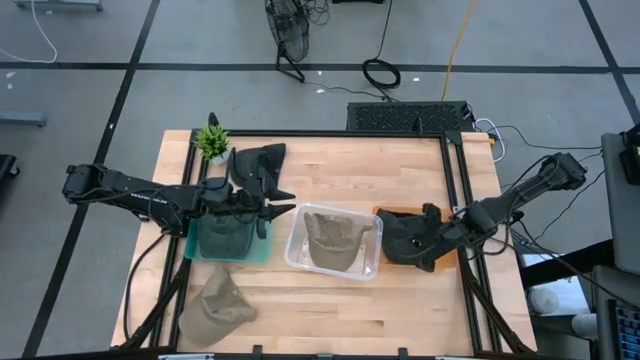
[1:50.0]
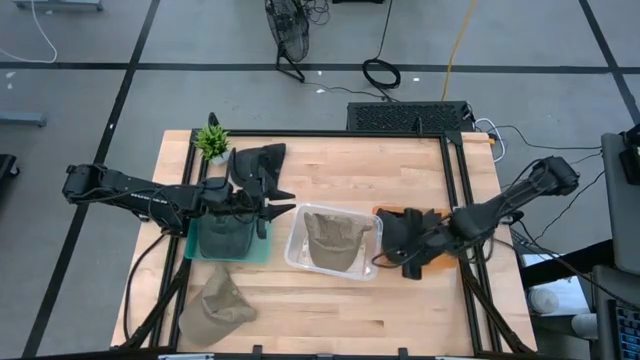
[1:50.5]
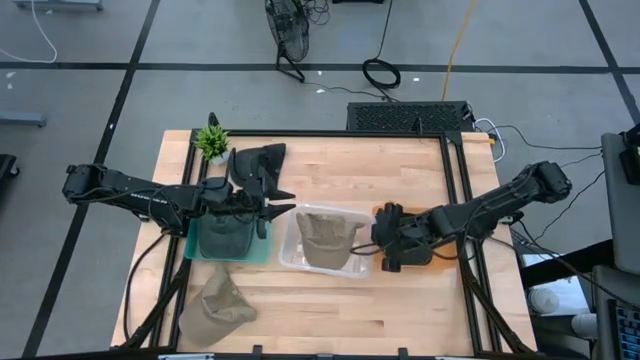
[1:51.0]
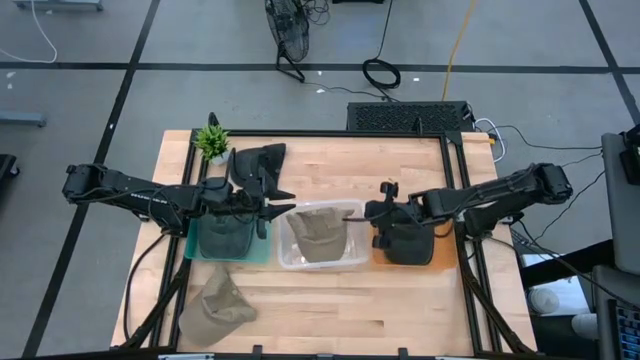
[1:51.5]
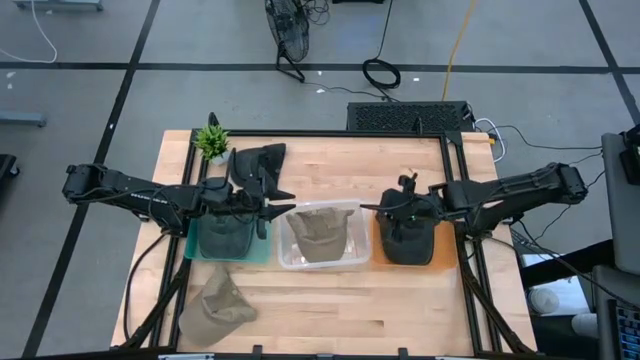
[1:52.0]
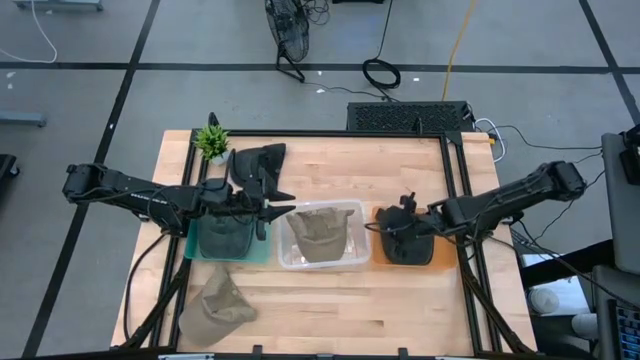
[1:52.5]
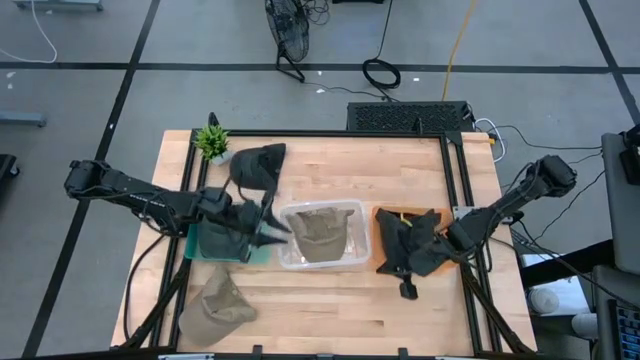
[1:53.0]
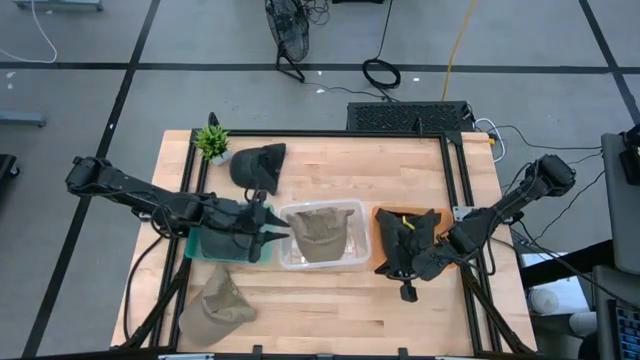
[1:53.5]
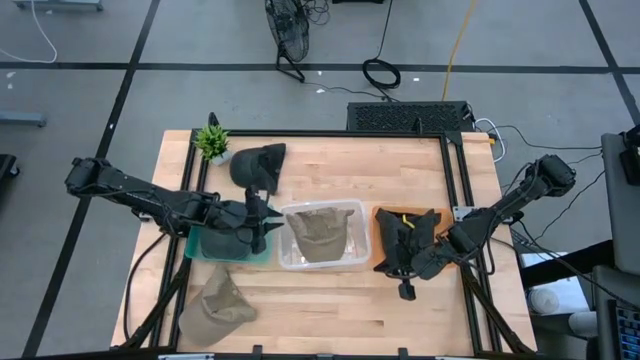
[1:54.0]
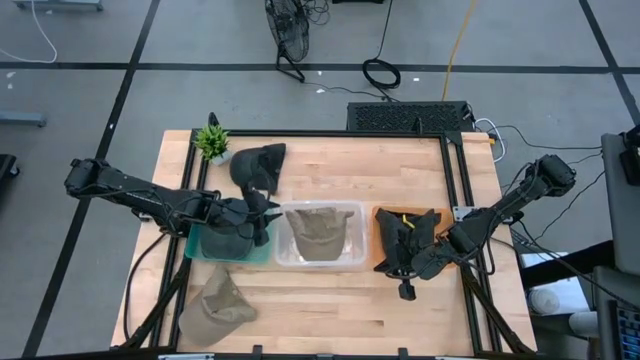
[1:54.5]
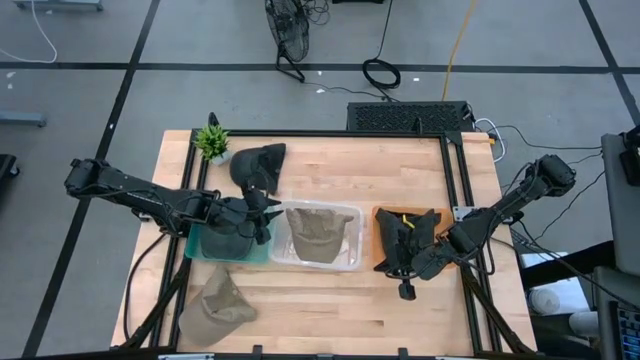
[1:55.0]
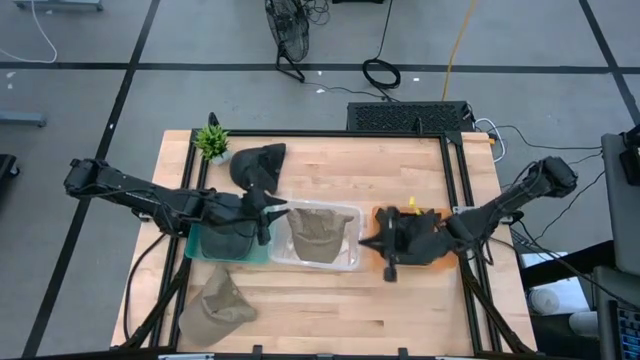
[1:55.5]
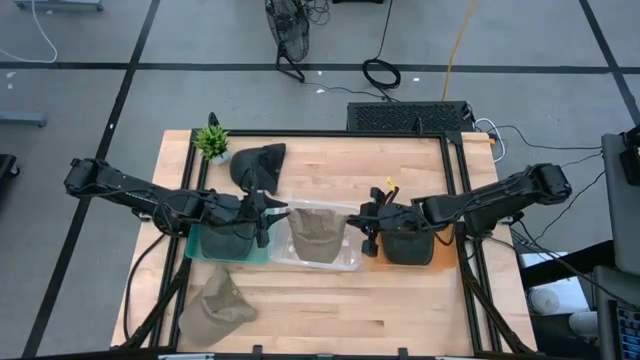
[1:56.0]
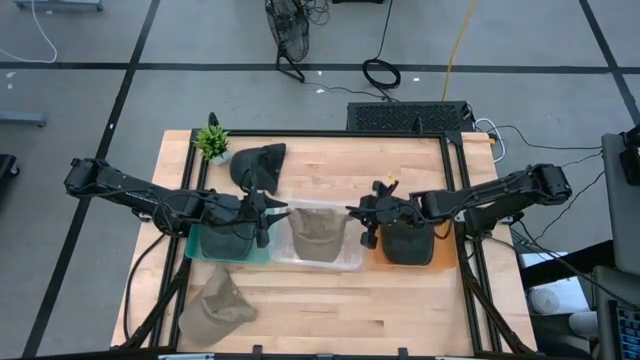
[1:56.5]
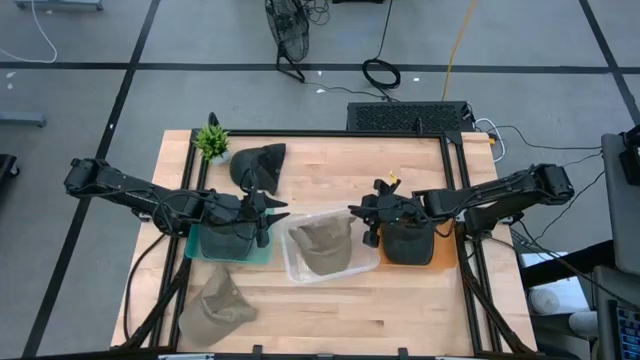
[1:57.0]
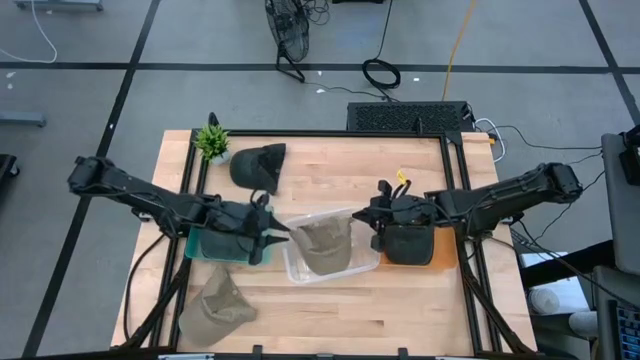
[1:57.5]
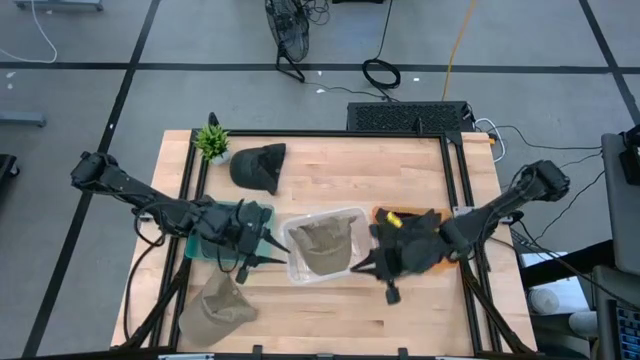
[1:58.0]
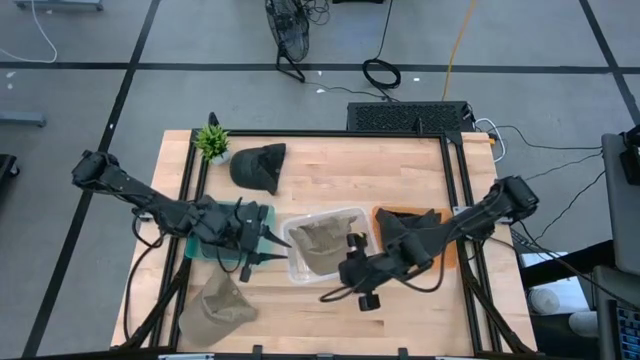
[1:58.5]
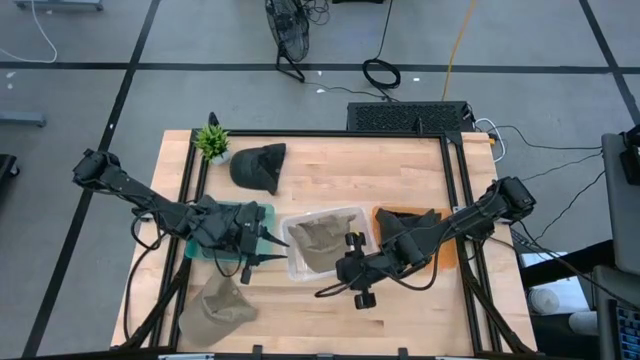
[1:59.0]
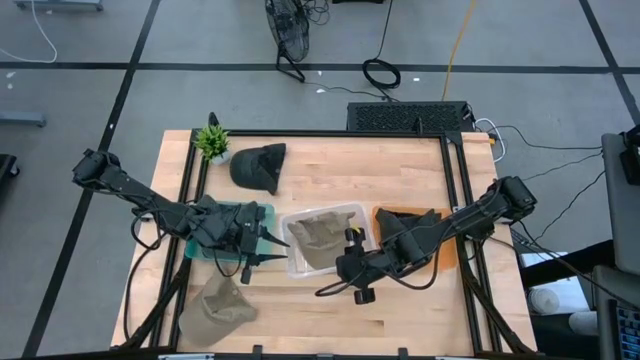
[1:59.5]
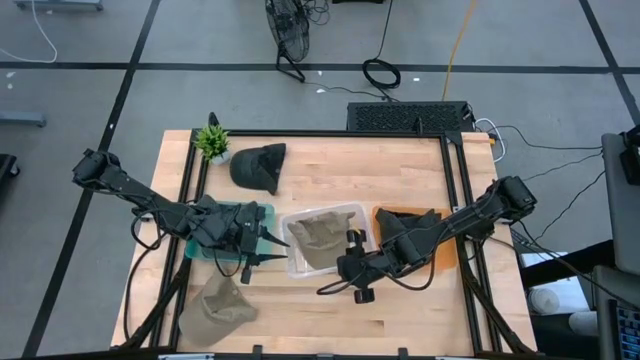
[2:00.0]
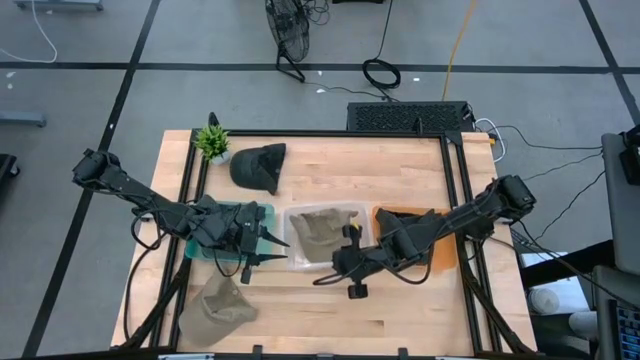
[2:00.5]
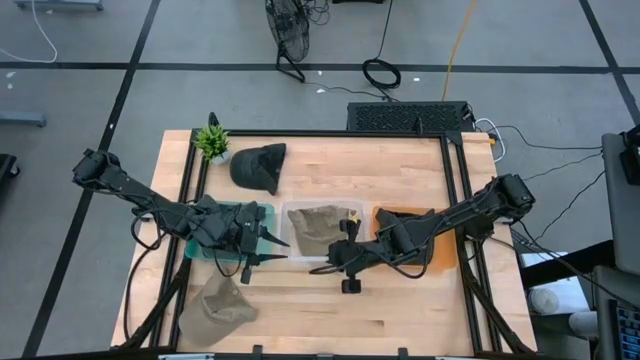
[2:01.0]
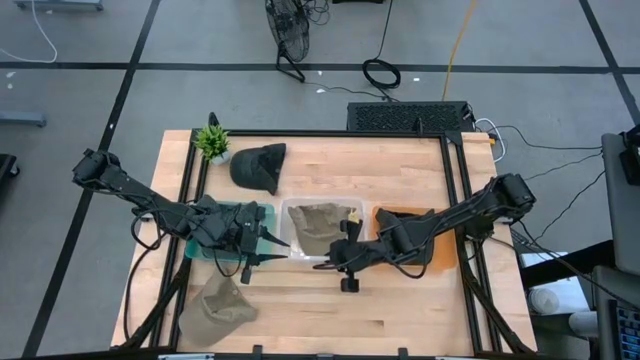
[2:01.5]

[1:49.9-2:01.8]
Task: Pick & Place hat
Adjust the transparent bin

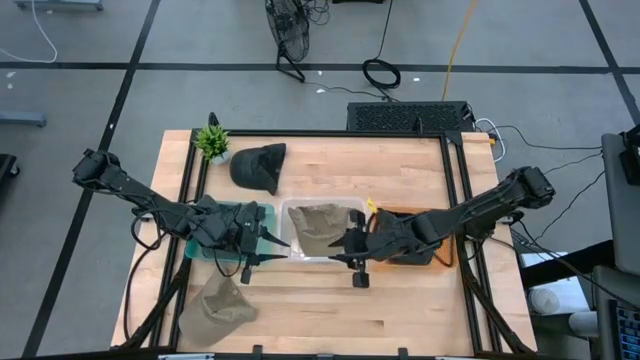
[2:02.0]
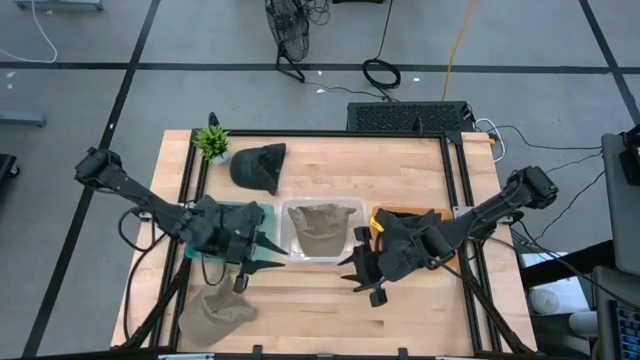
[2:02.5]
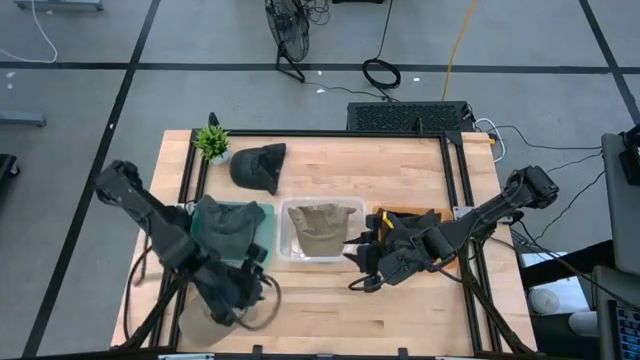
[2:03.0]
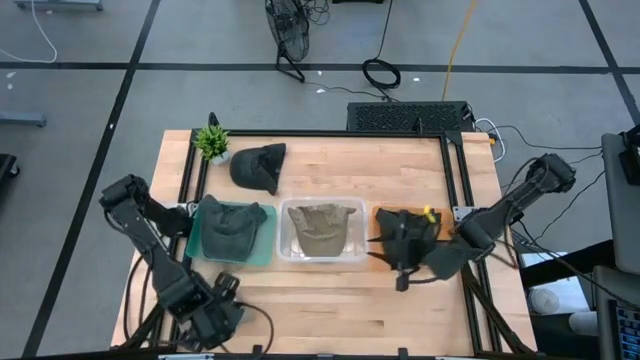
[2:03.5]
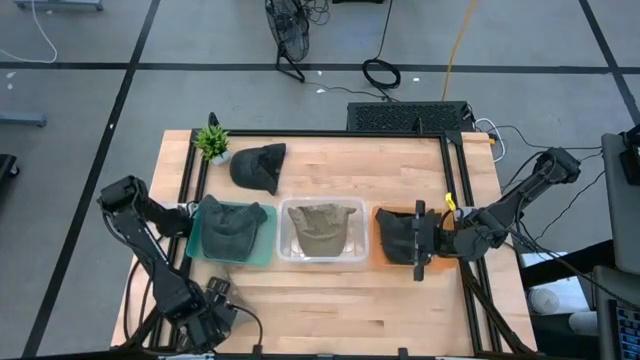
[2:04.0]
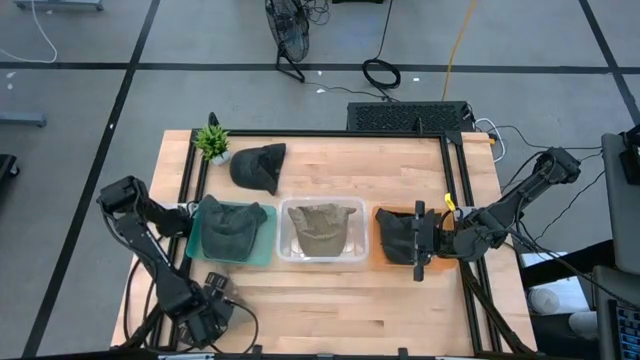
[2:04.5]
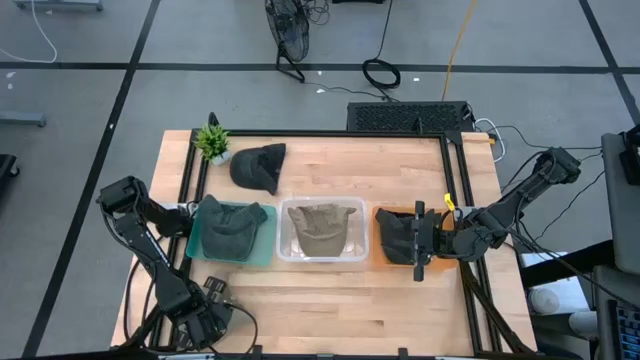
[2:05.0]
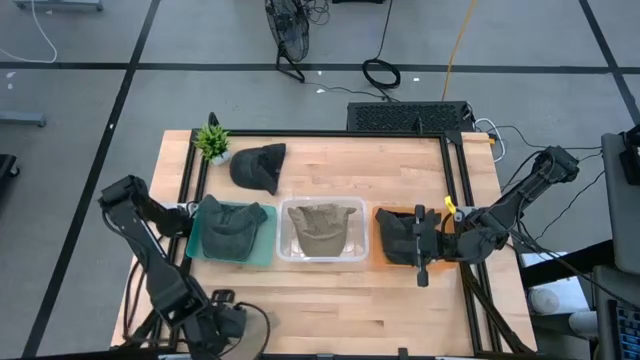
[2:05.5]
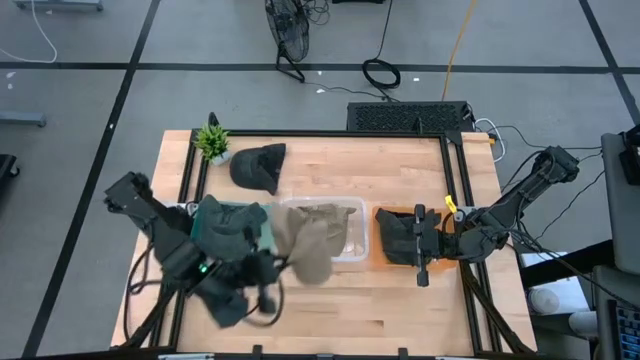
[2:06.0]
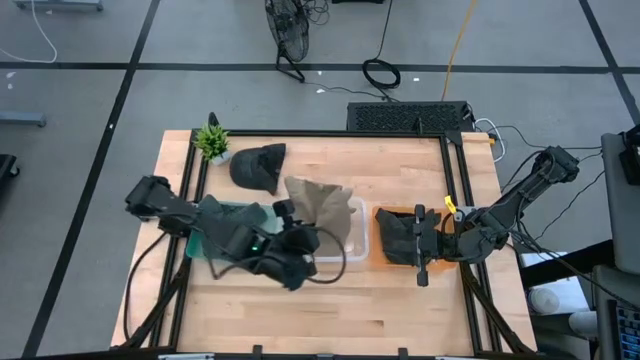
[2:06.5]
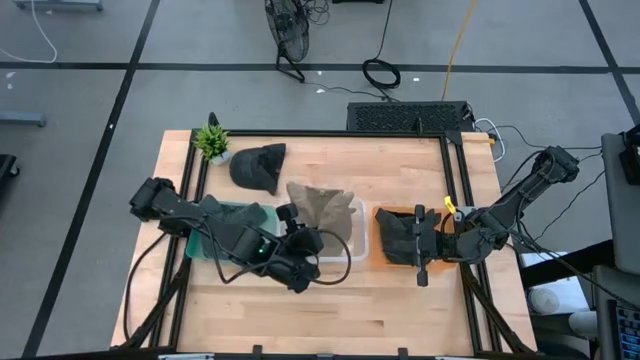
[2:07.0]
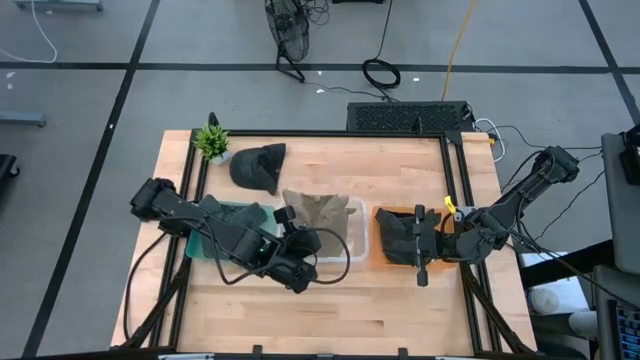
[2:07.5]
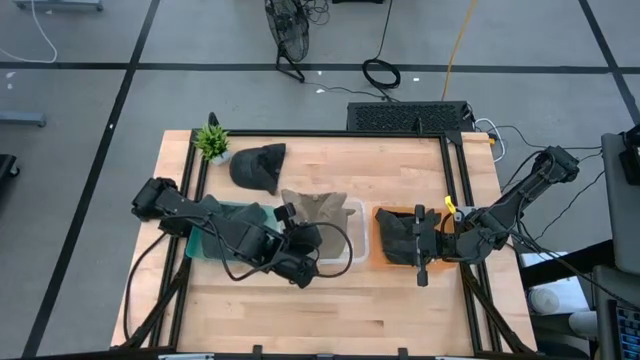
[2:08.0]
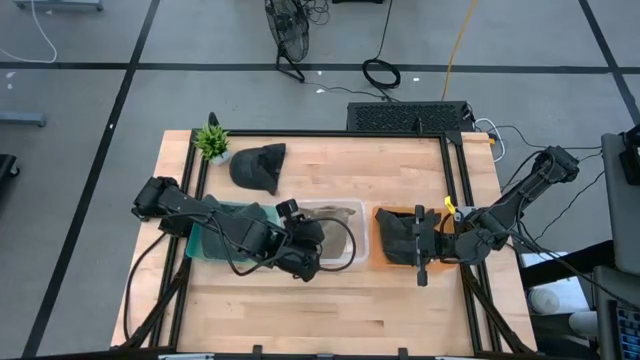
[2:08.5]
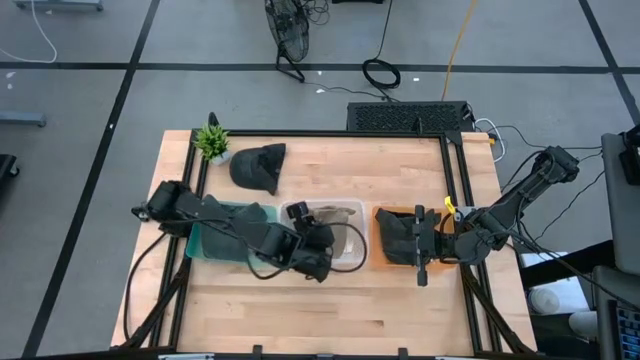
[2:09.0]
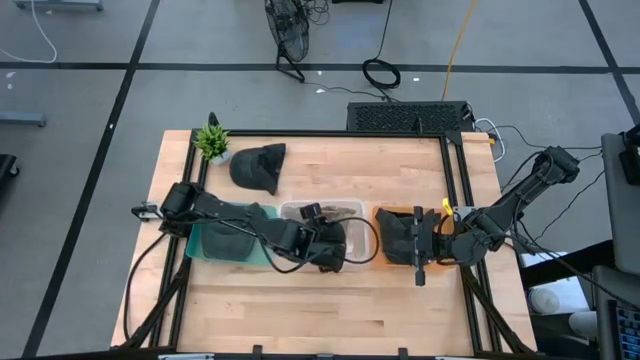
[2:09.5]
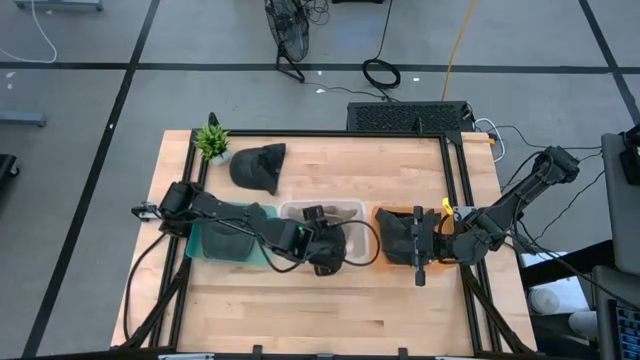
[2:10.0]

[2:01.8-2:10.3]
Put the brown cap into the transparent bin
